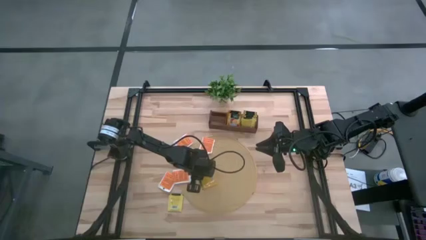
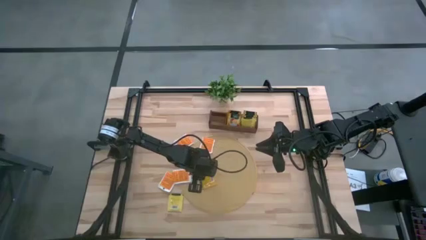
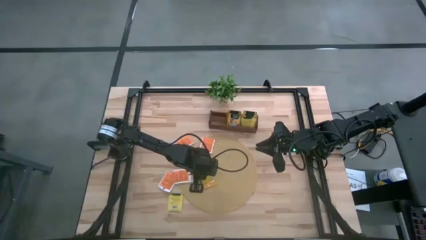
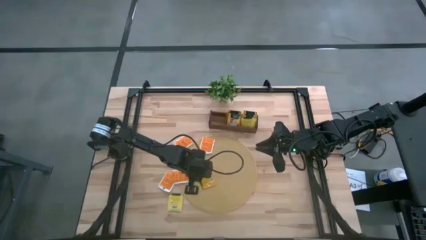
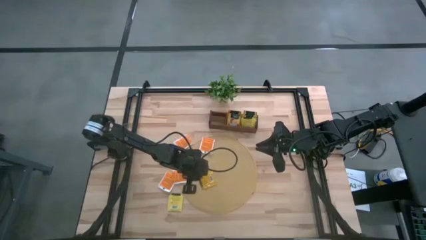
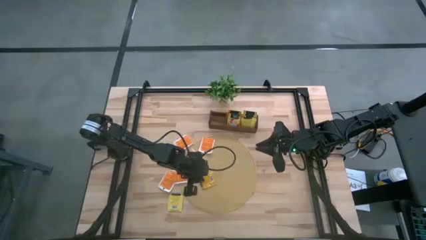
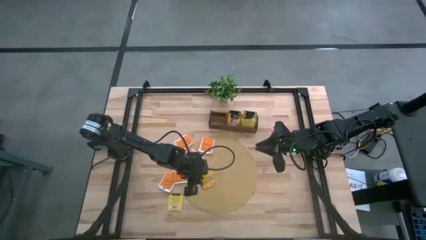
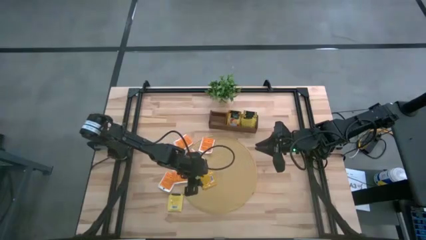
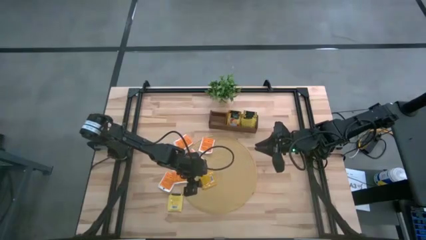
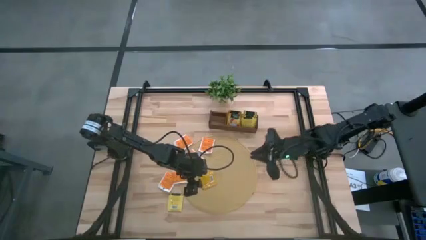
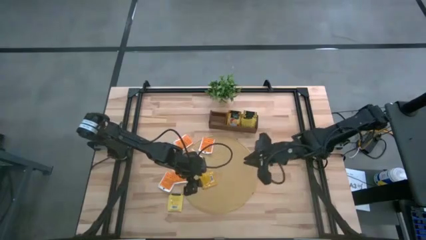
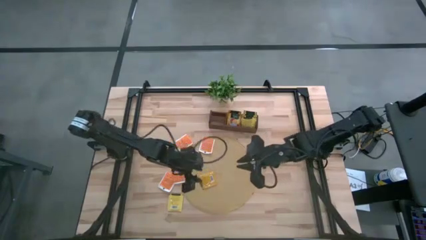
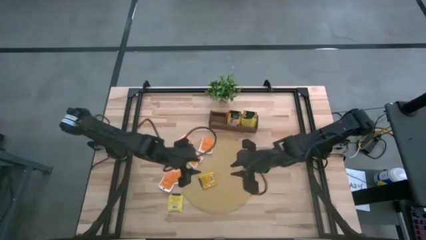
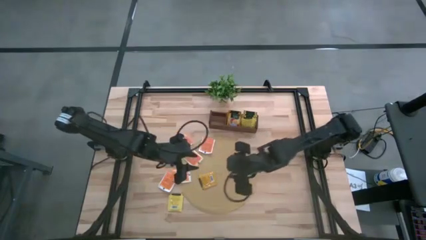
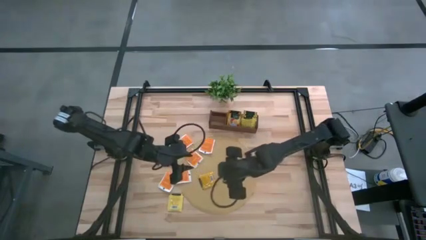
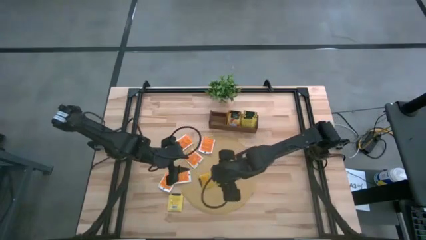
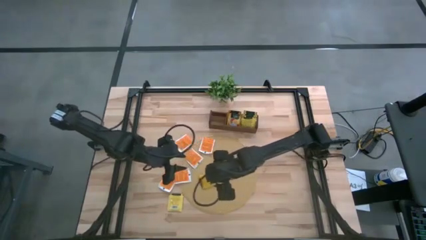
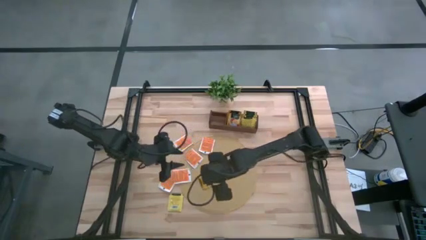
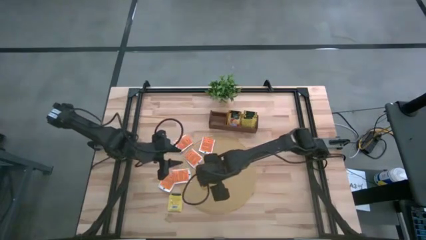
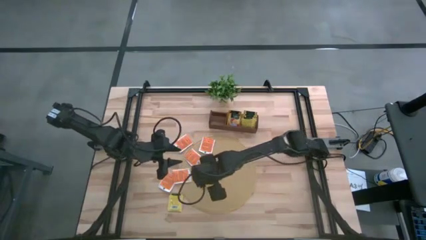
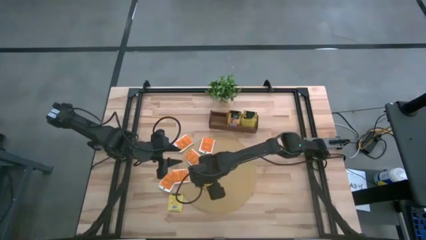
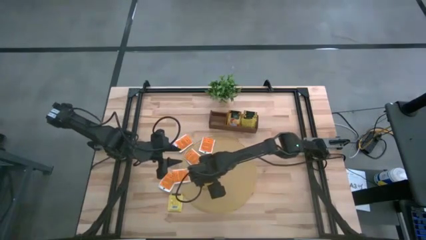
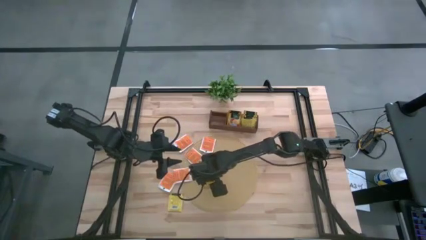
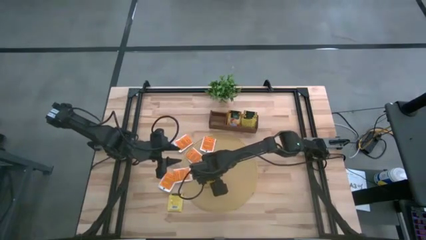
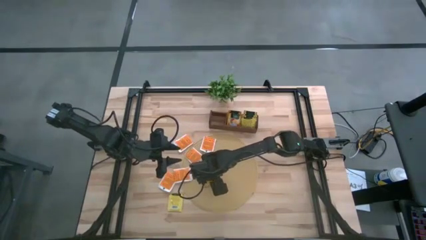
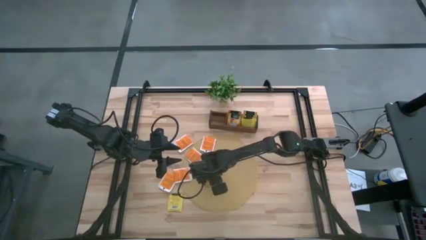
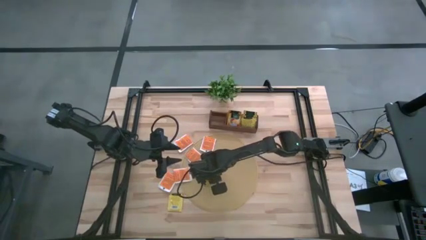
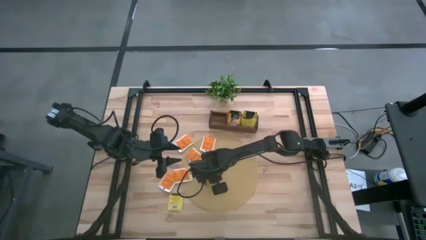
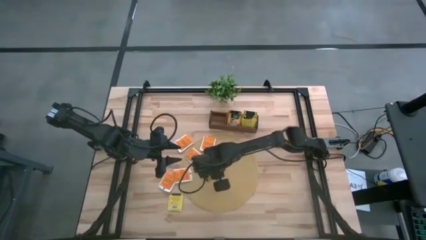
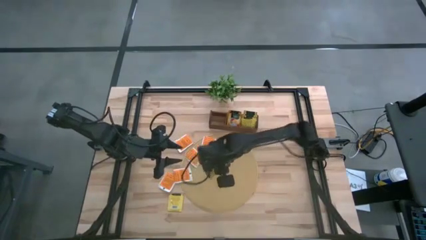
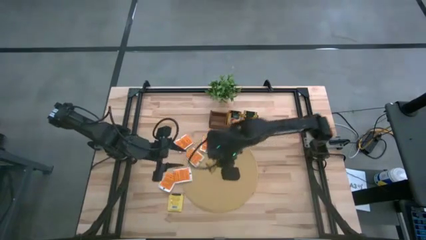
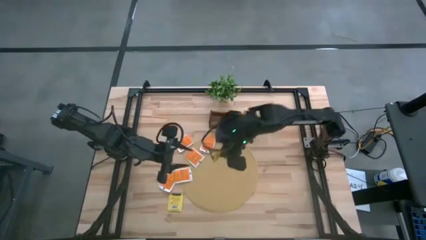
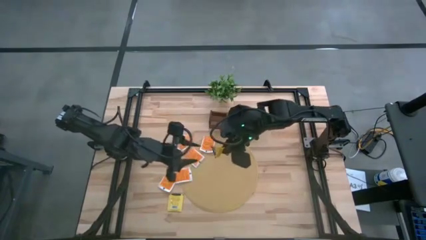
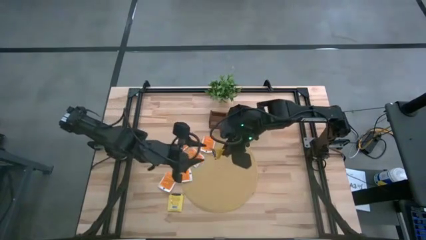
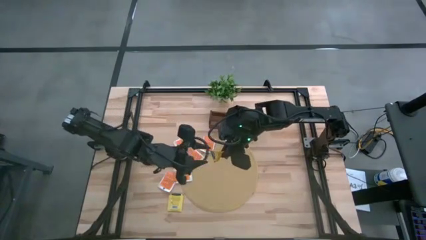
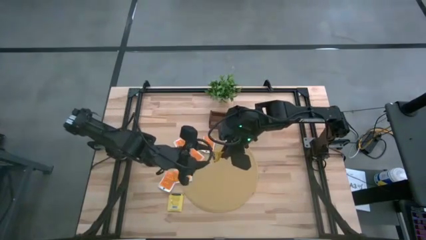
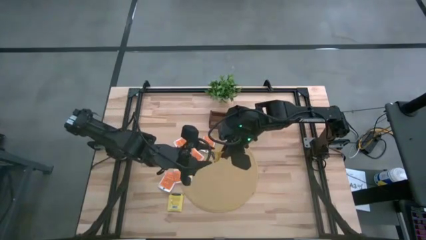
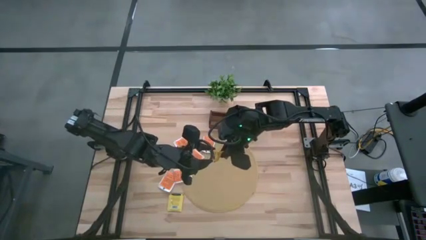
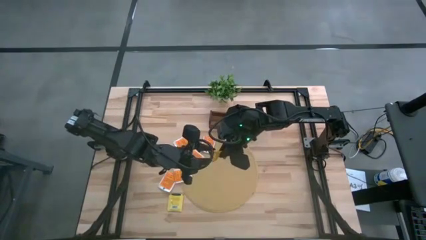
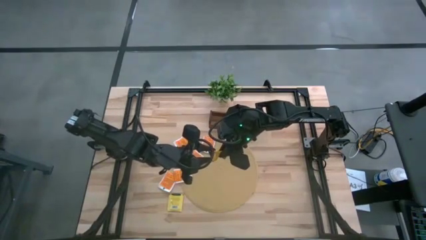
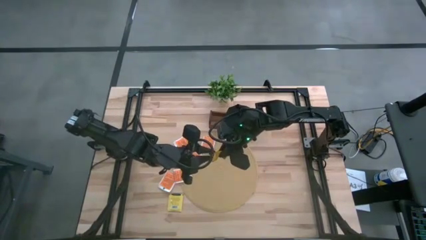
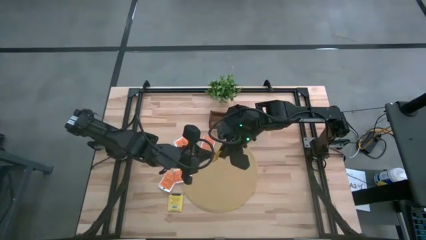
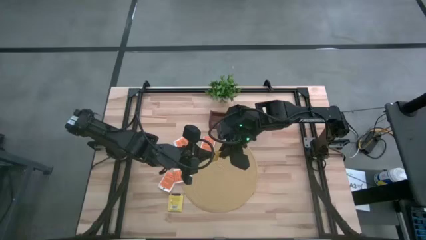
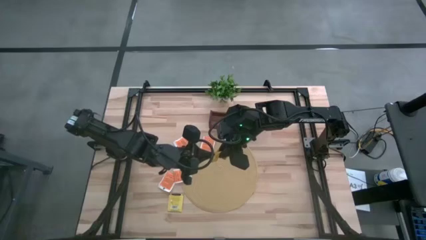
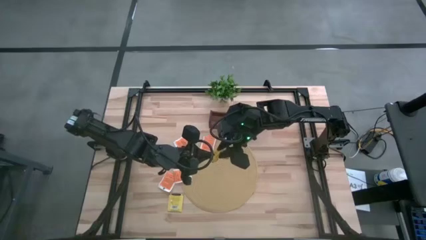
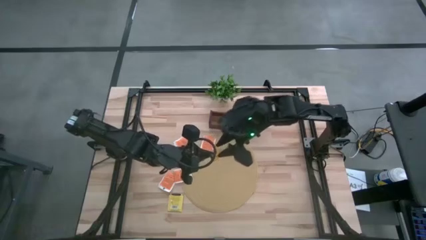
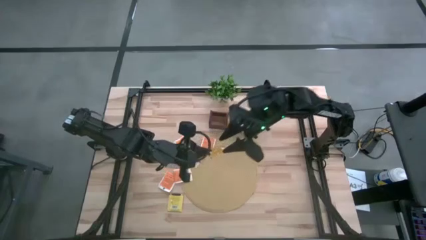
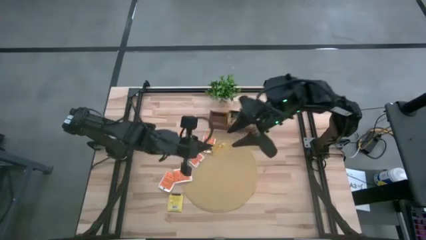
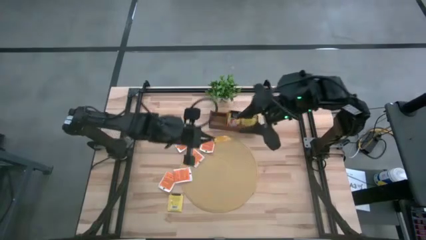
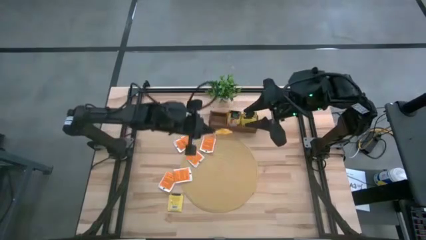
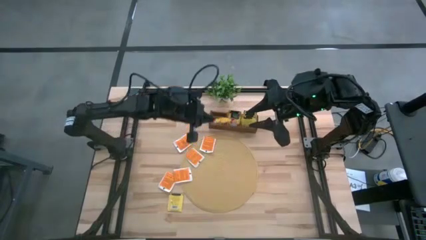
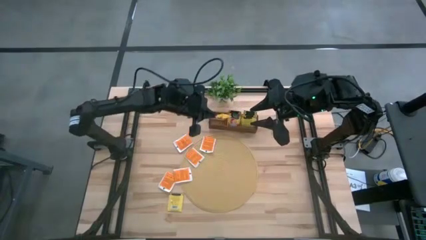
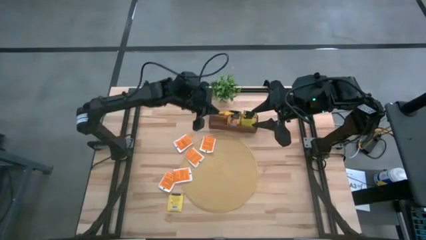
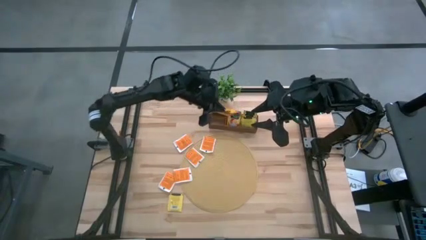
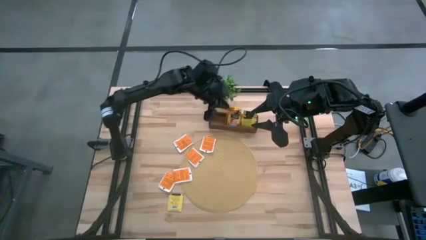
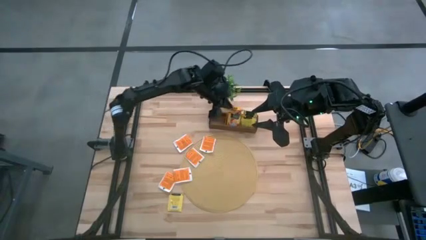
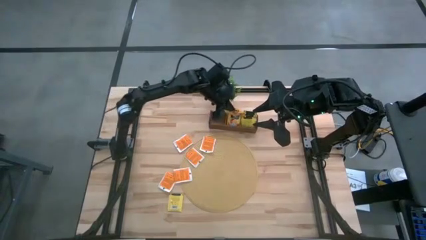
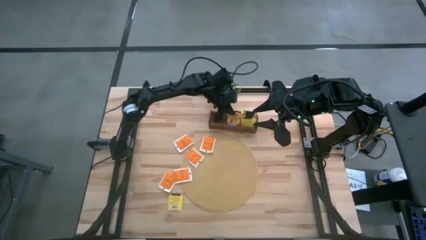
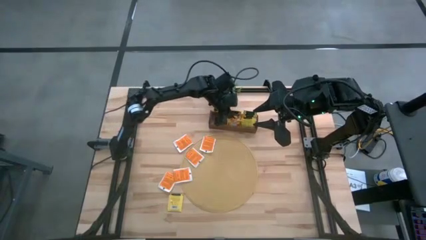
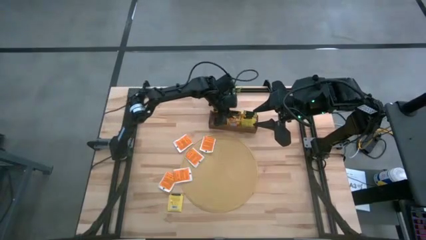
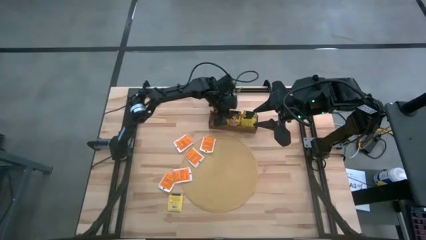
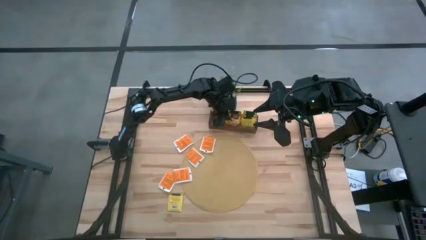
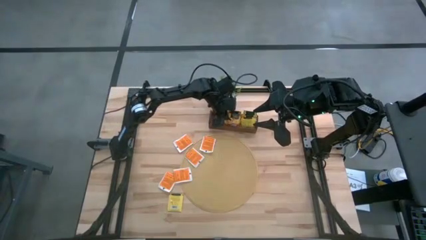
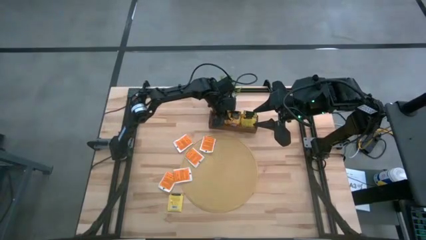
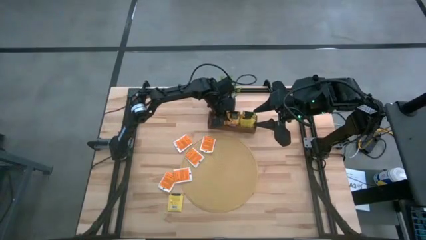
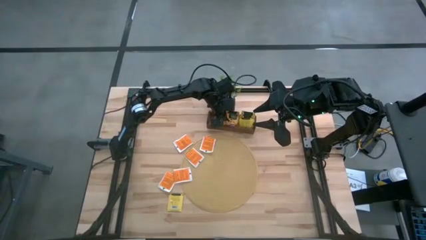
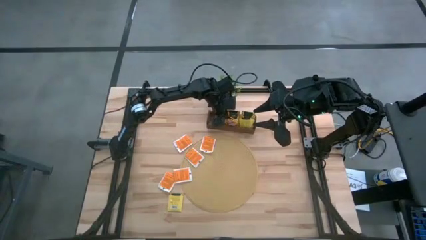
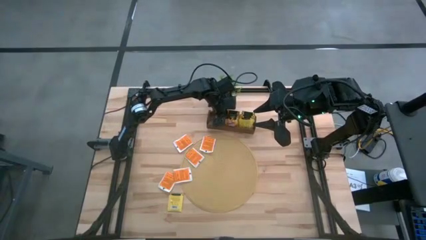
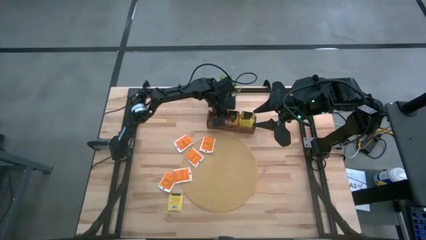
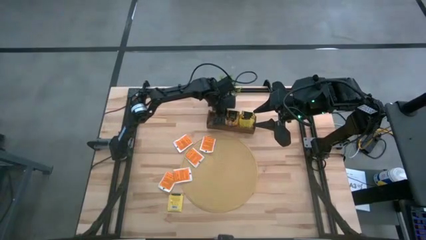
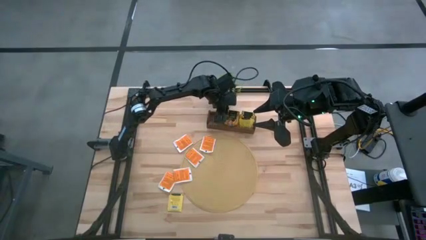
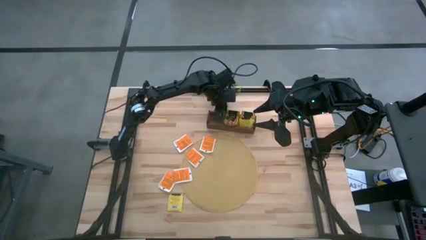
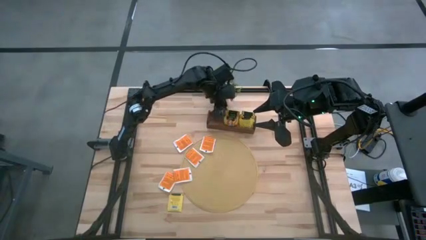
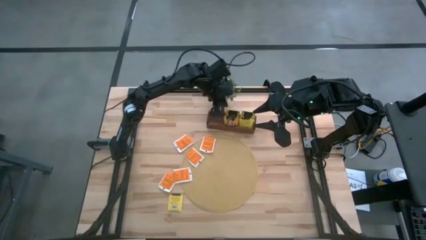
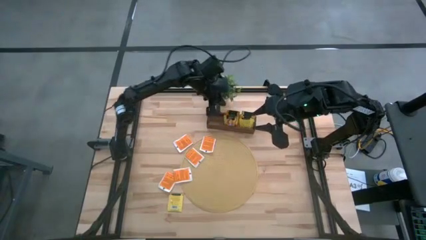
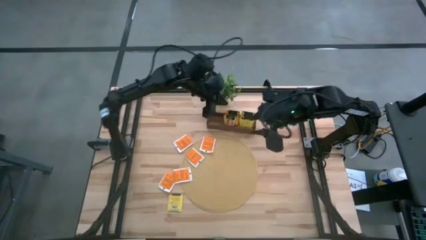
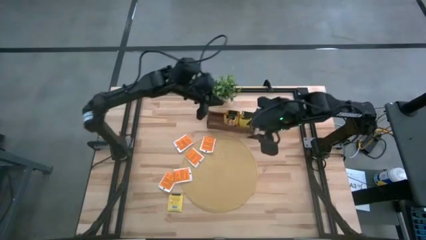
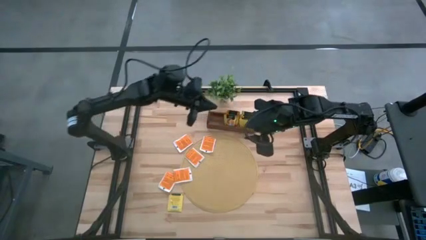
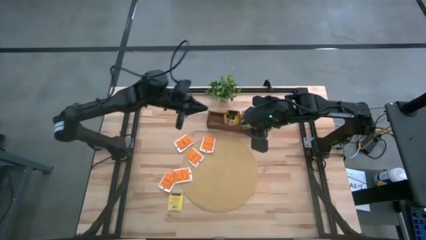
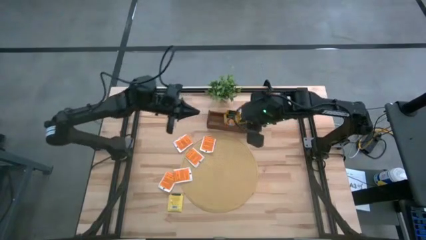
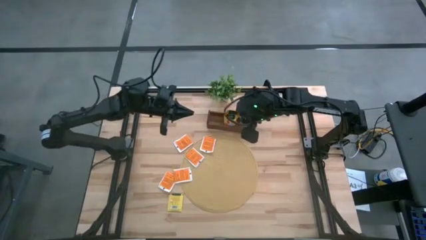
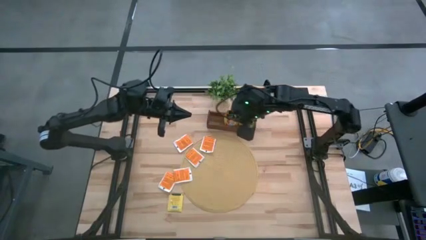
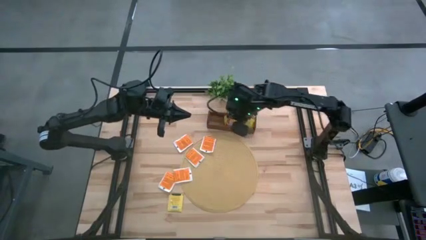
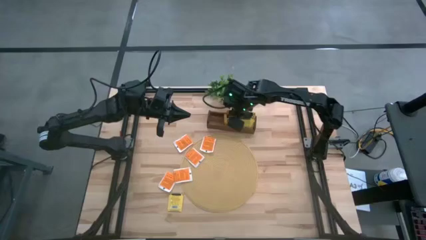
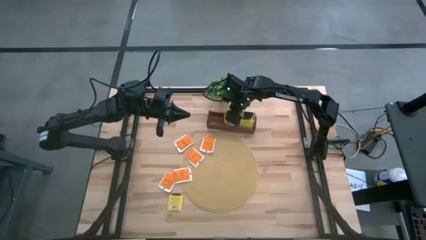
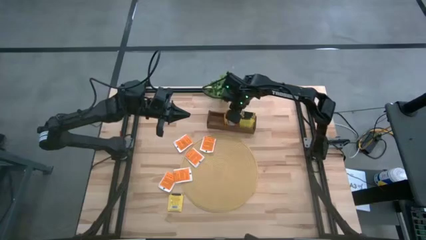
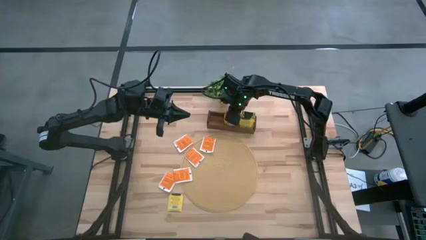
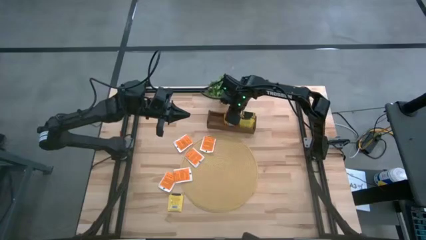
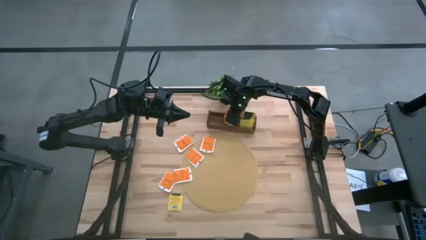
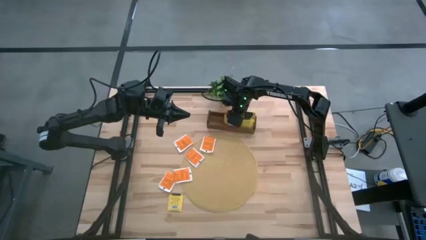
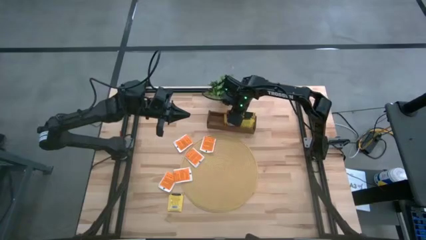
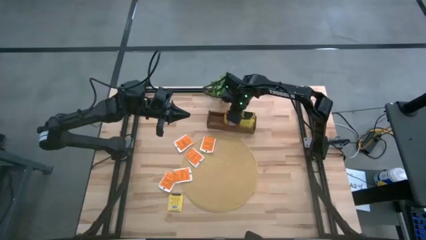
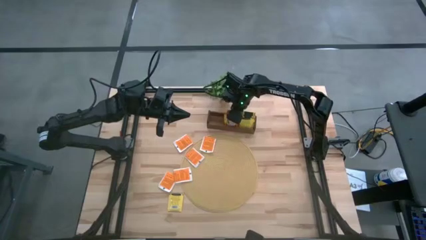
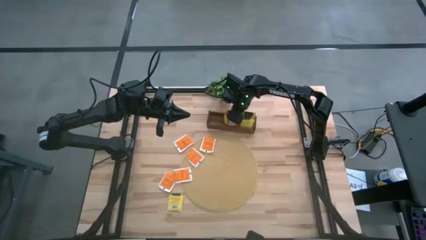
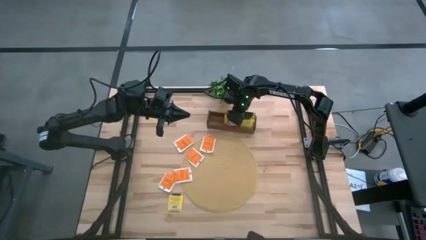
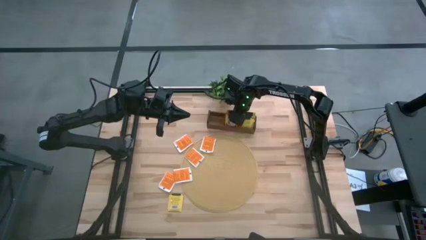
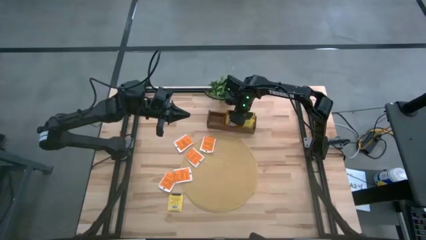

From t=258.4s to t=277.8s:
Task: Pick & Place Tea
Put the orange tea bag into the middle section of the wooden organizer
